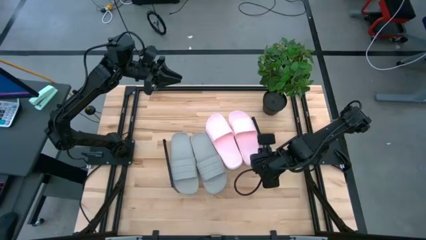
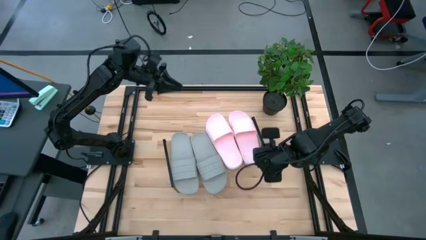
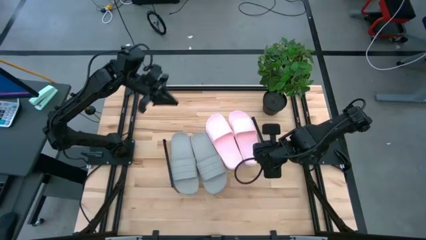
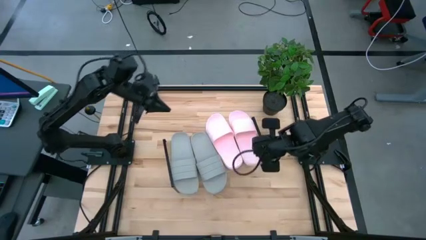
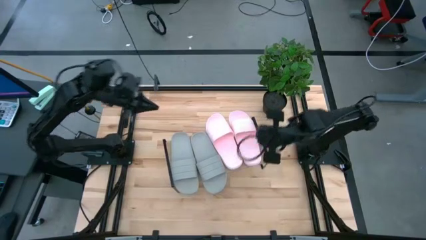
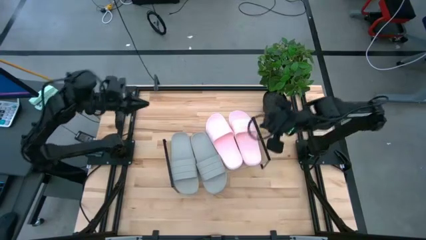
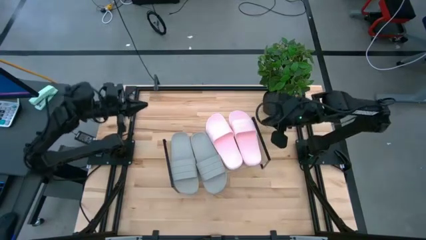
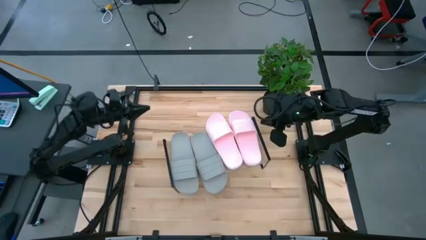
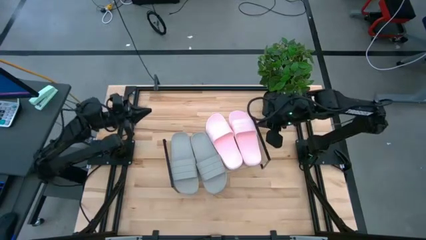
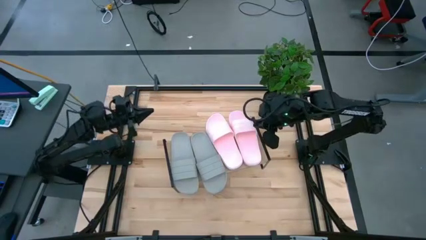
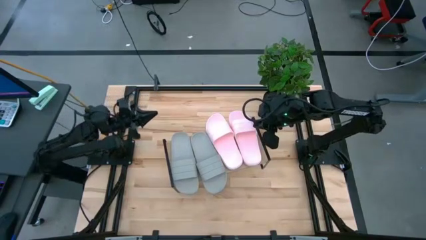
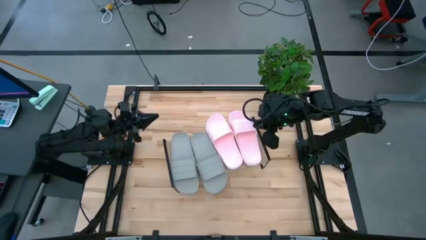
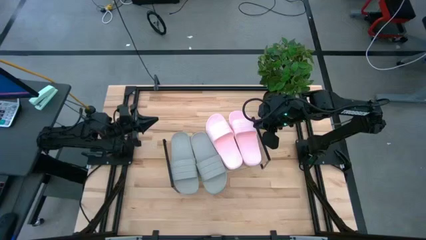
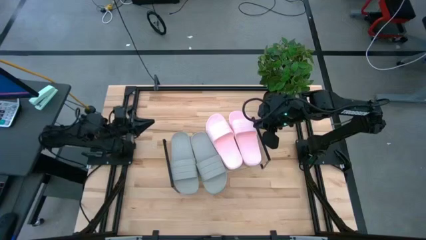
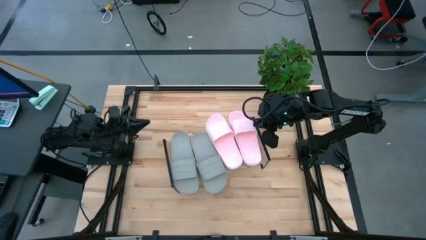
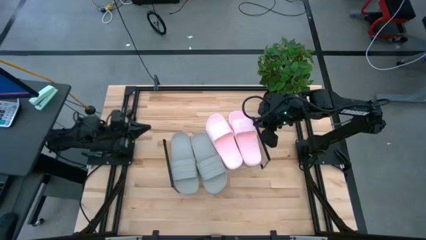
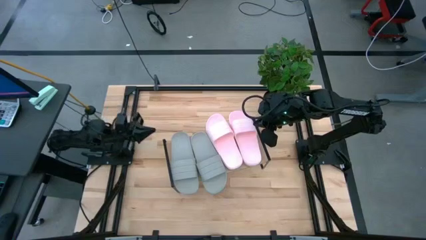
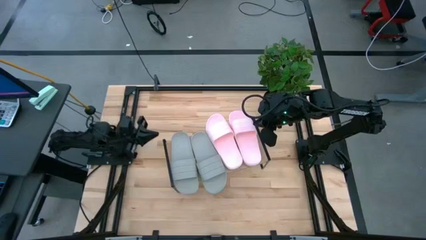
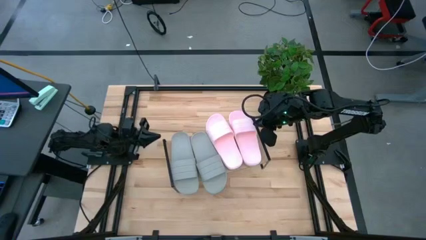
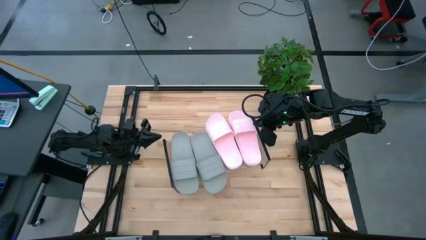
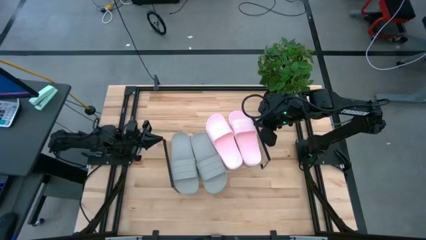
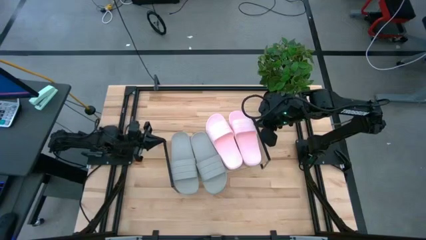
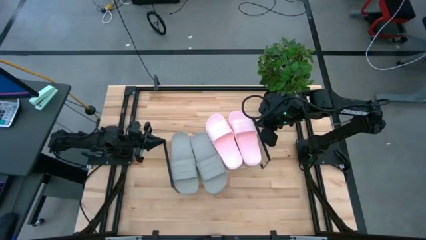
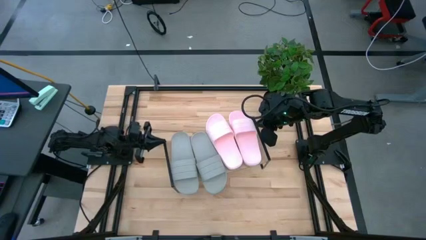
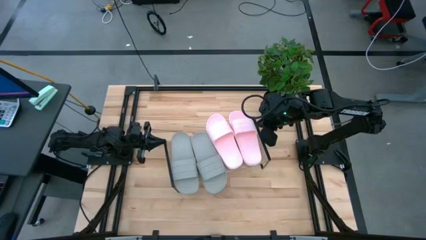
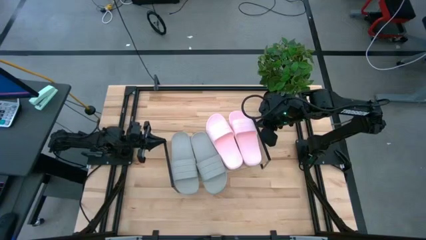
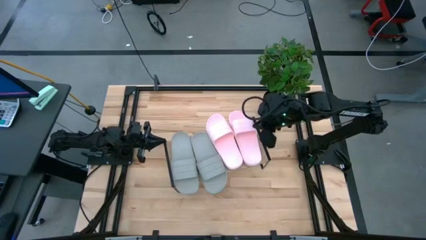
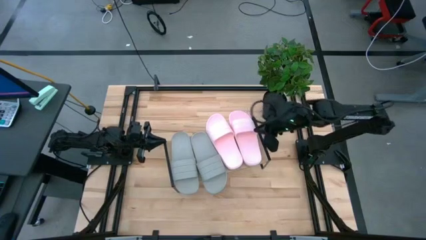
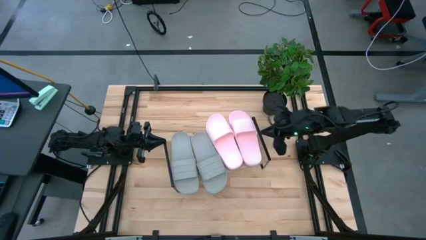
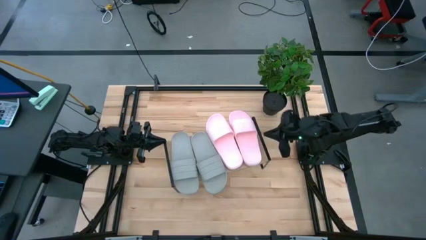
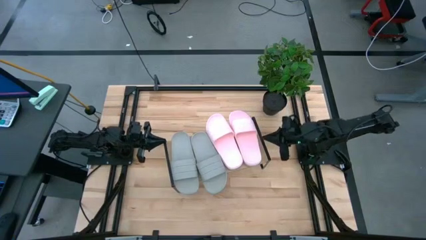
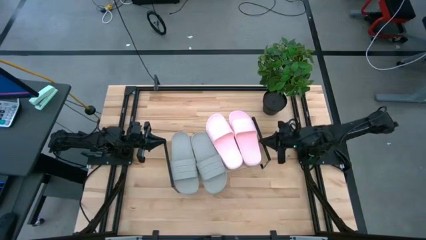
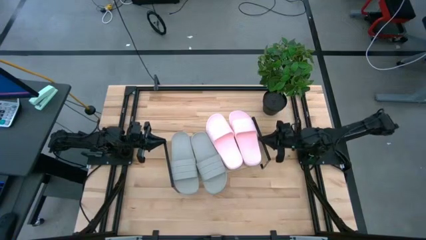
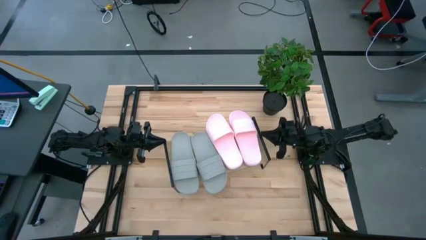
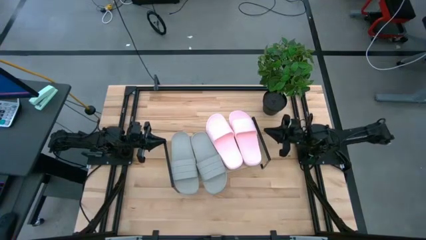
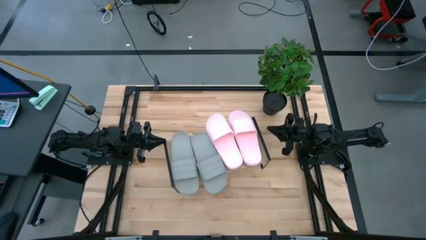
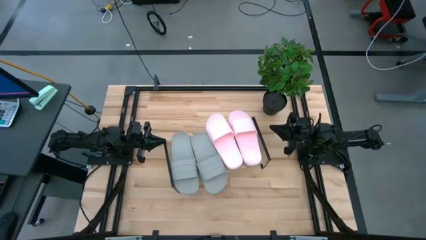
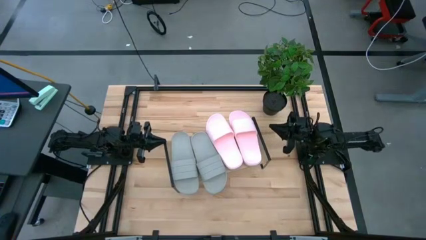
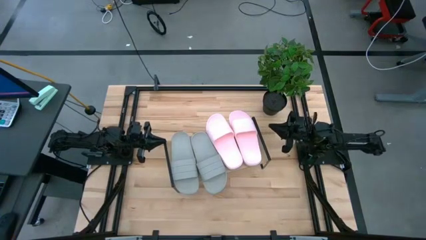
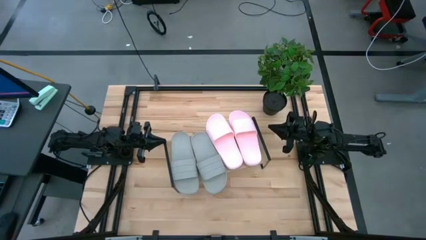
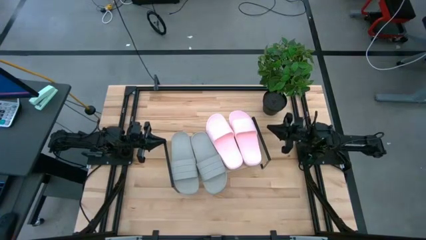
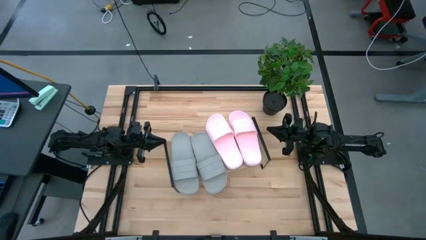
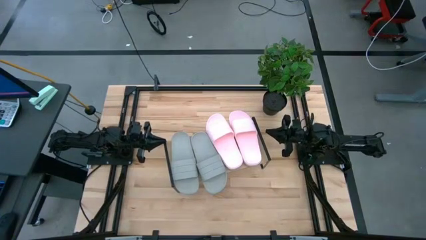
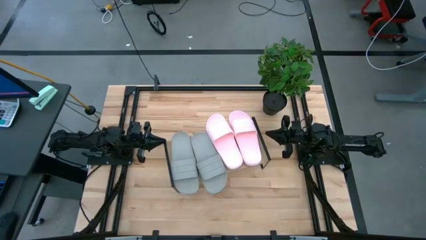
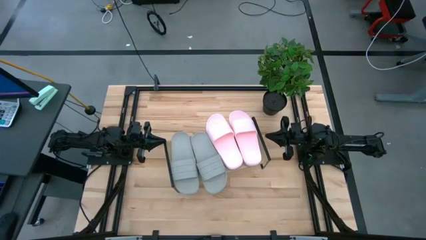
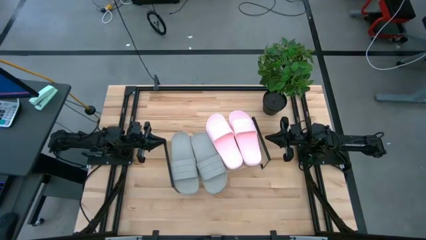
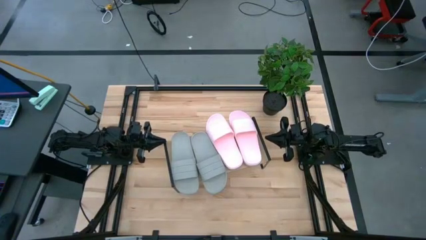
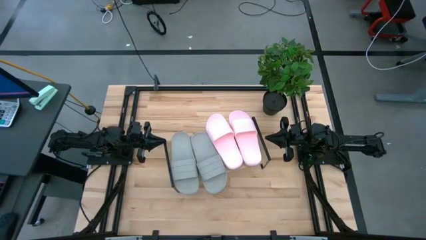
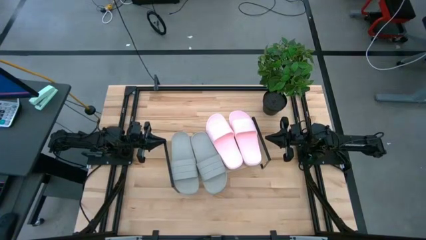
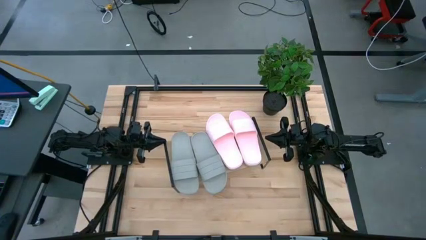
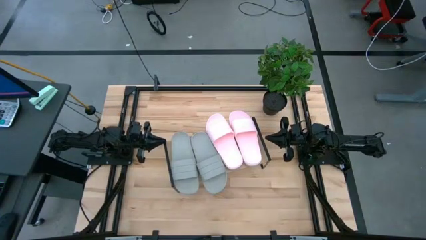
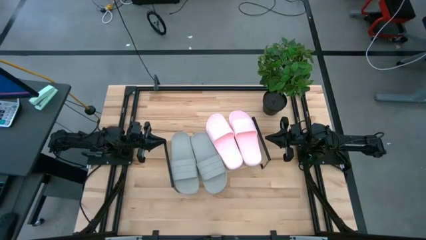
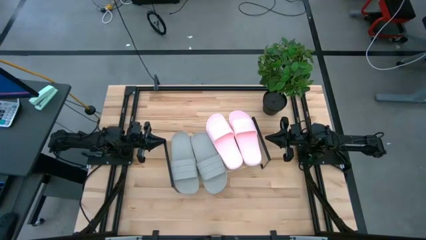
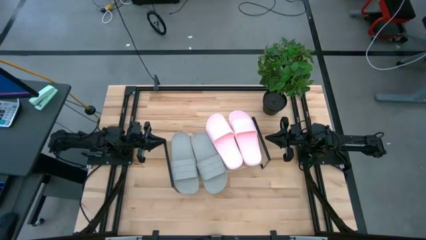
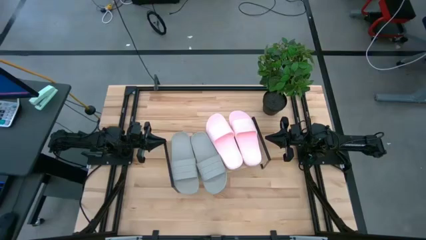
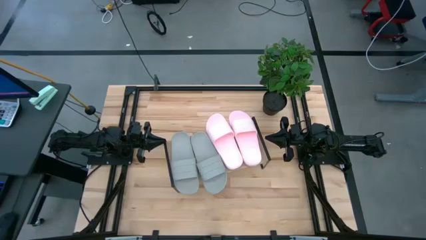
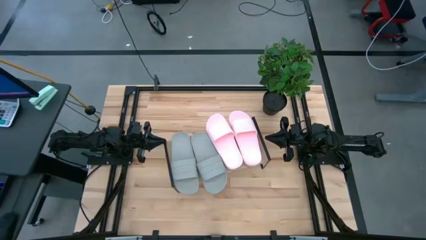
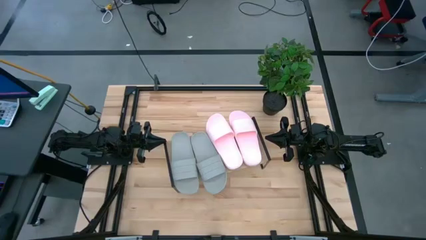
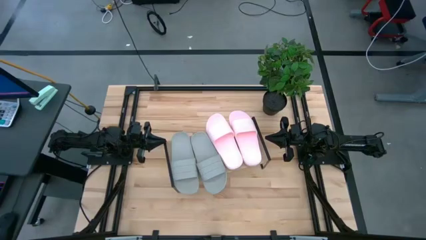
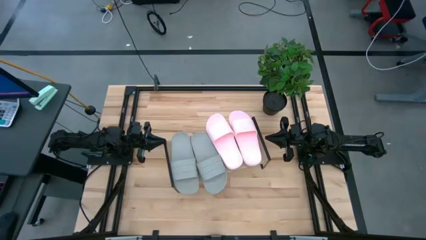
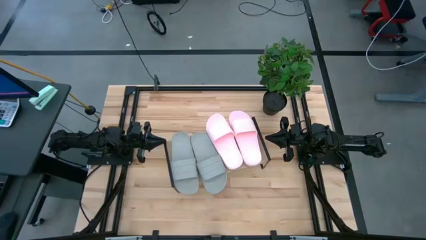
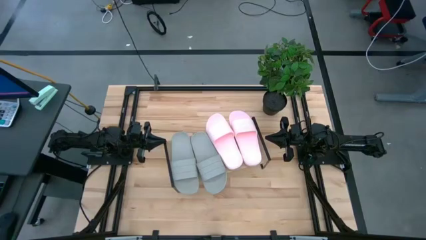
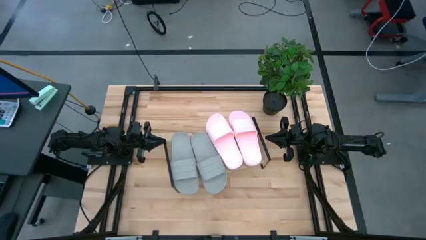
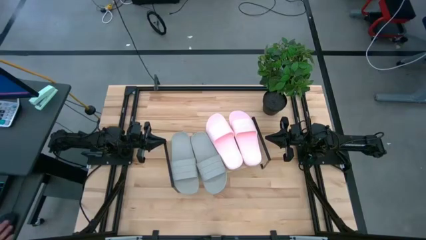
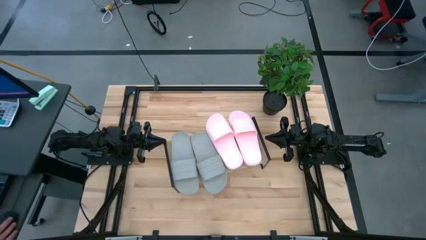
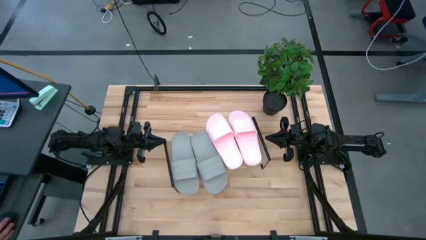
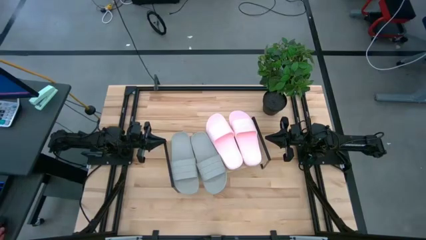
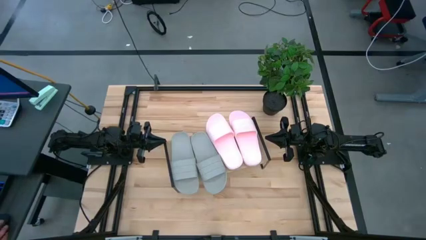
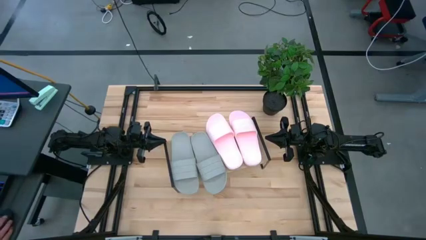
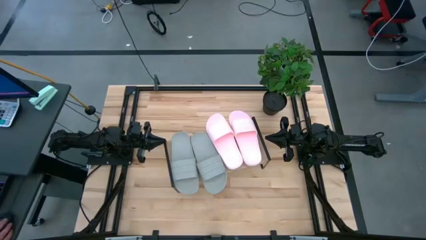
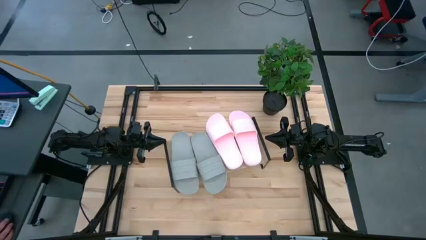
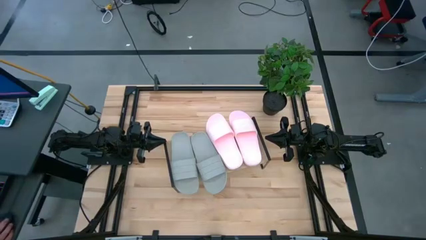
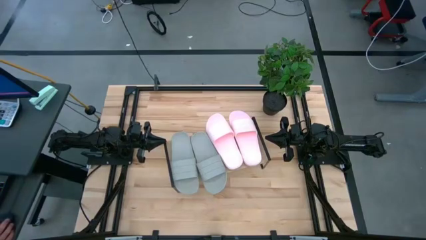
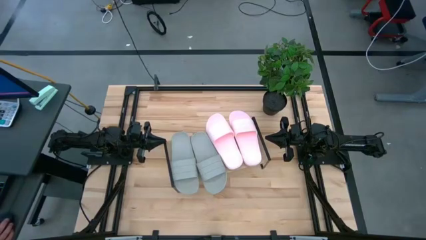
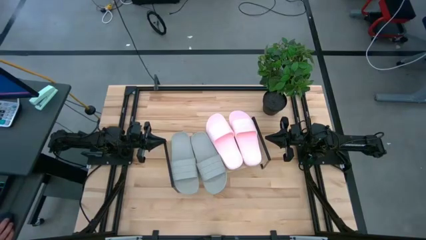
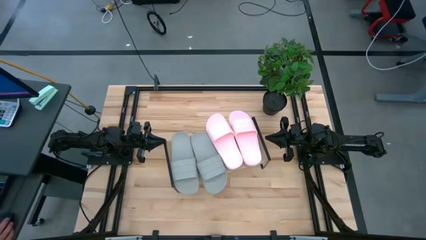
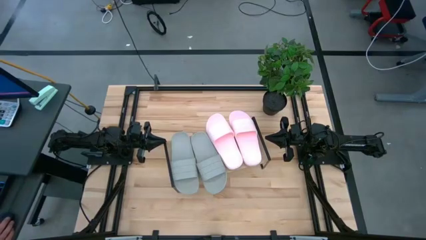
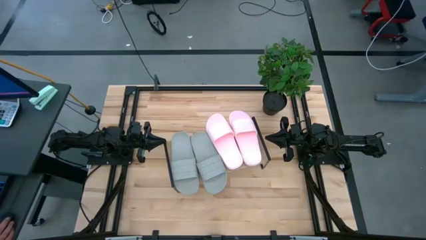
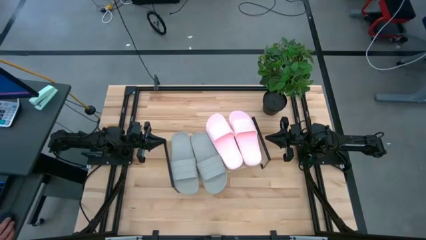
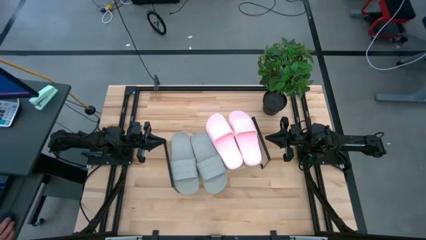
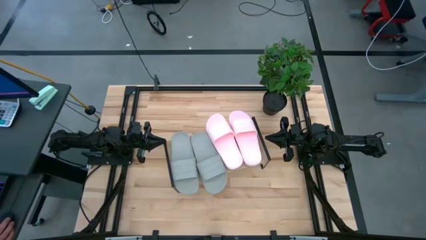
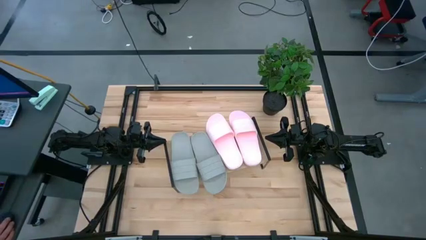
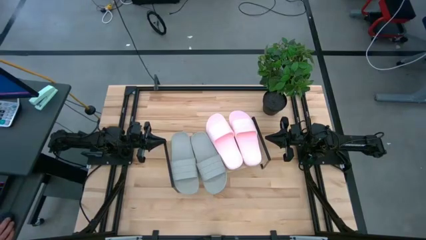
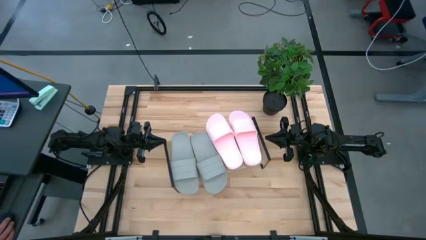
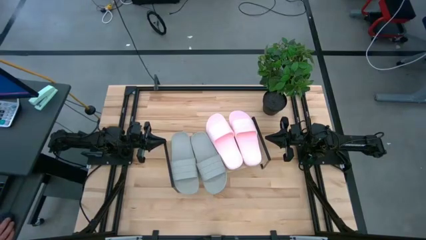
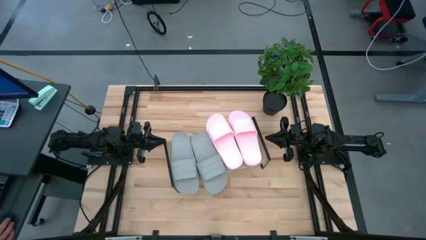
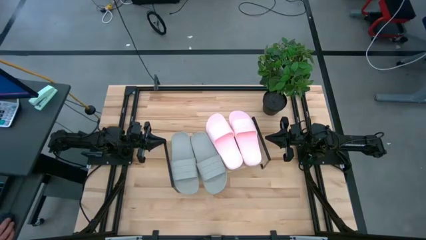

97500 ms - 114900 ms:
Task: Pick and place slides into the shelf
Return to Home Position
